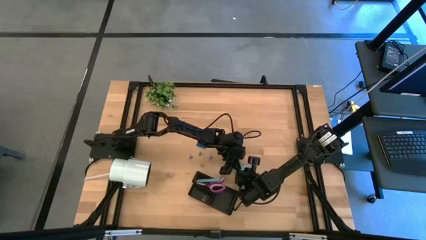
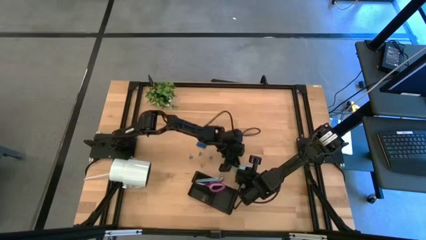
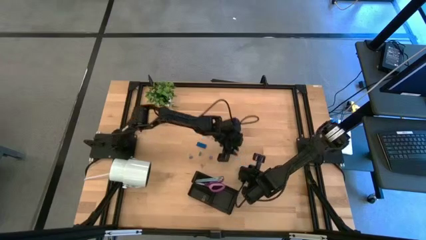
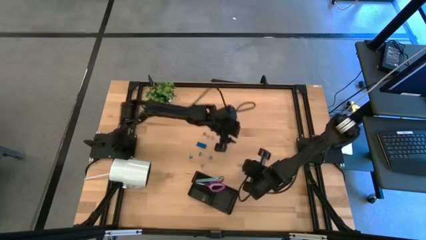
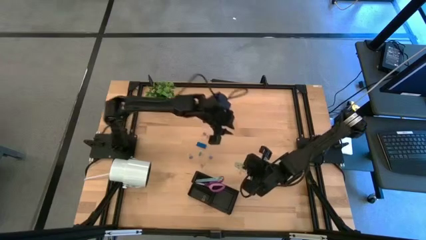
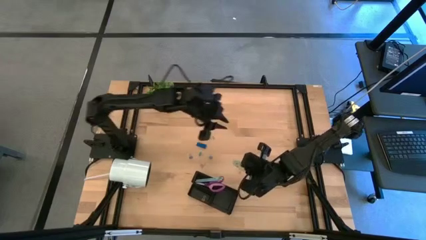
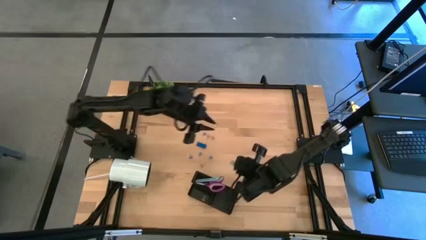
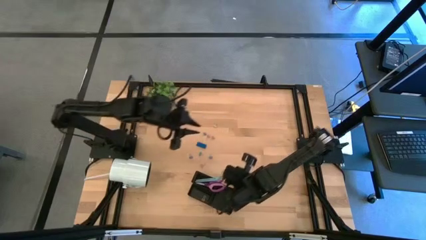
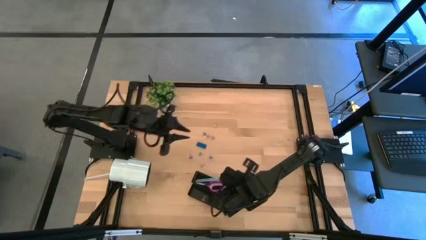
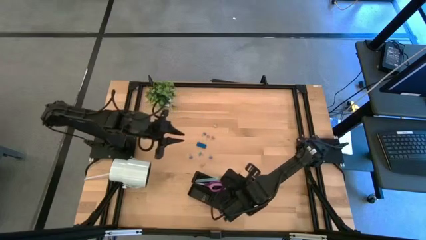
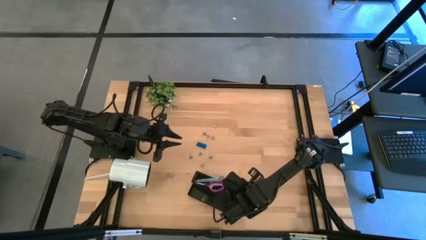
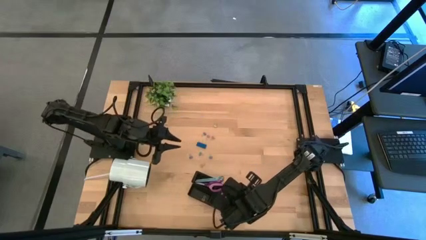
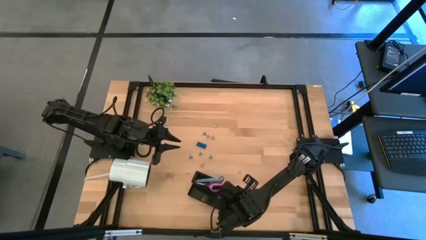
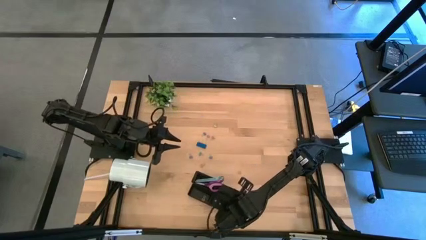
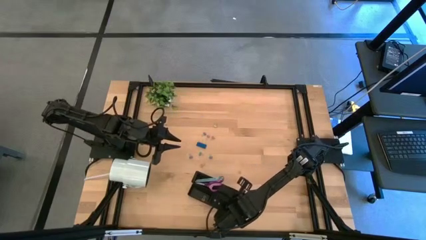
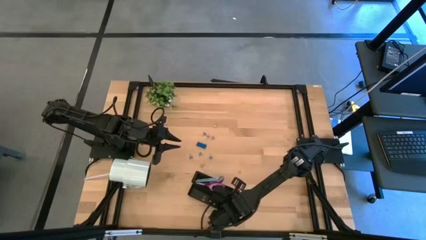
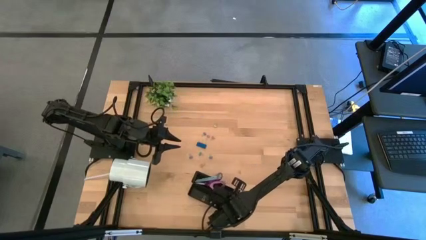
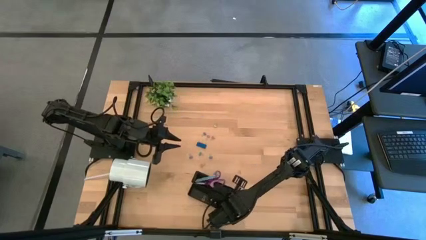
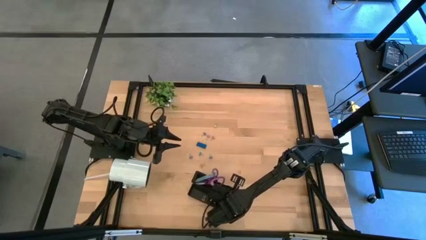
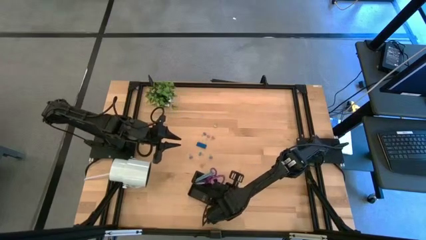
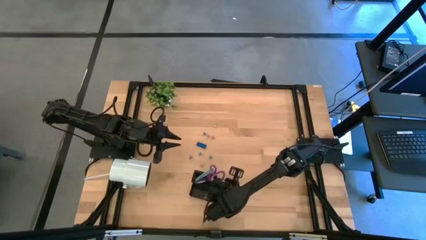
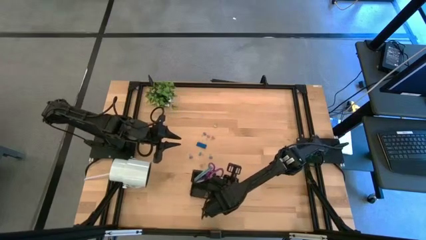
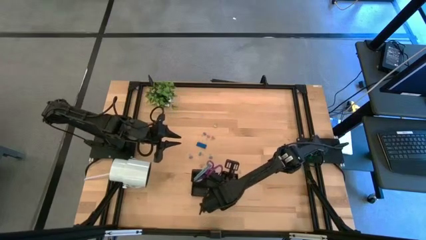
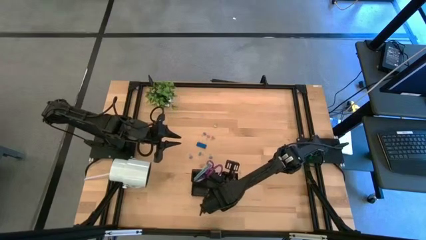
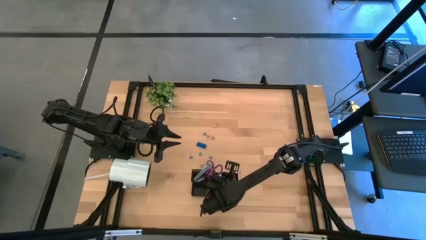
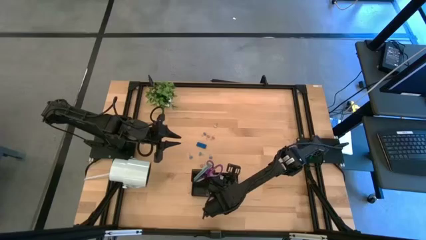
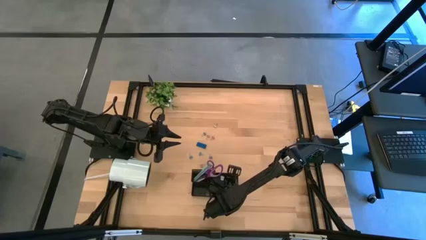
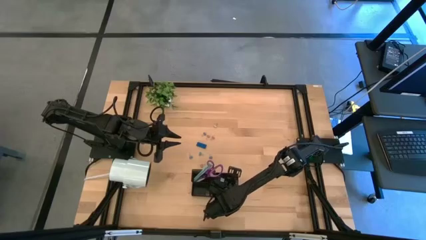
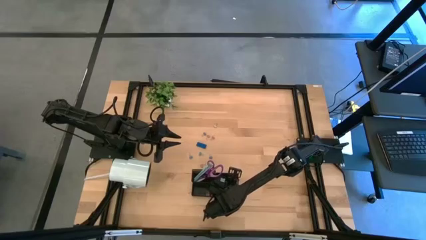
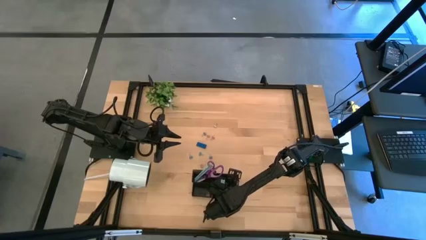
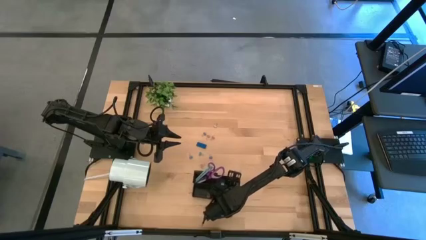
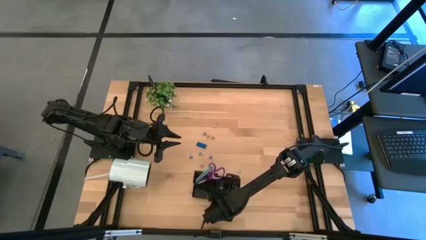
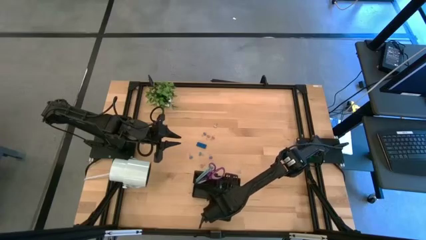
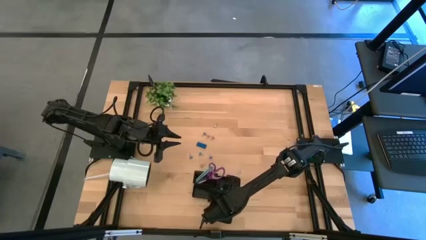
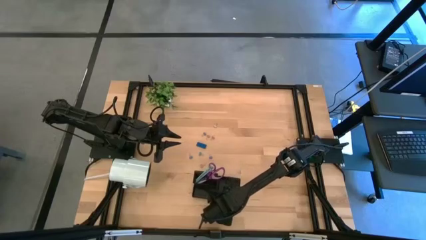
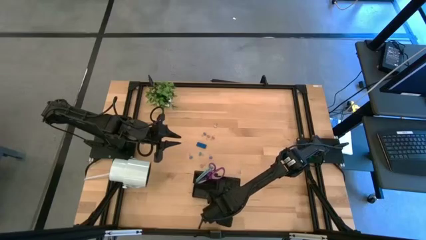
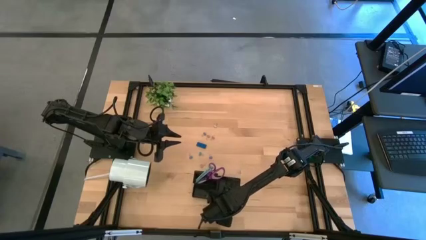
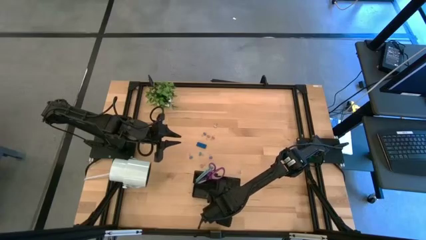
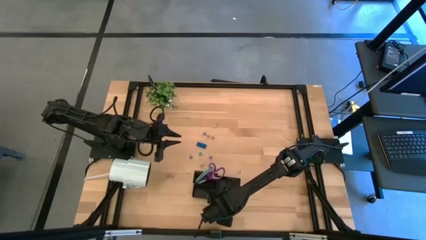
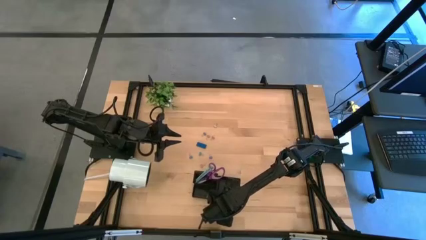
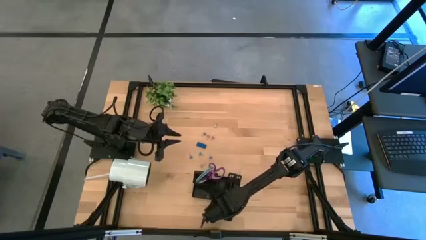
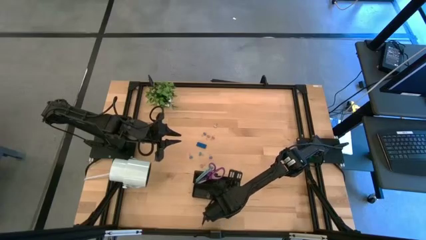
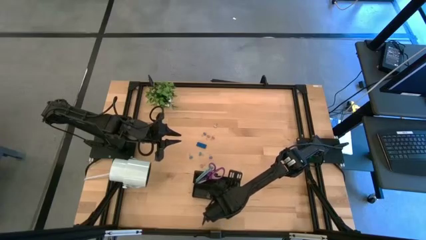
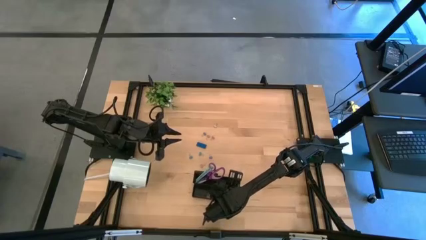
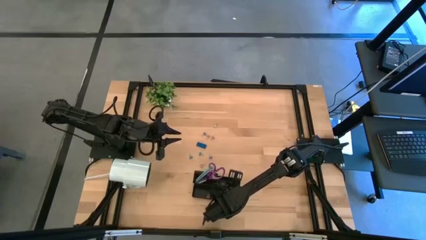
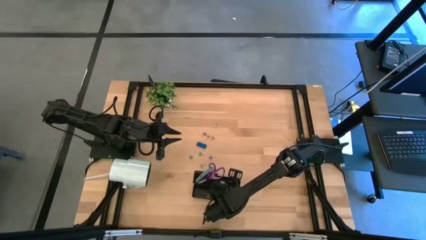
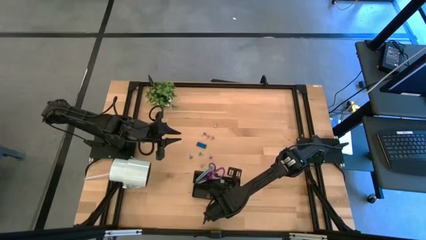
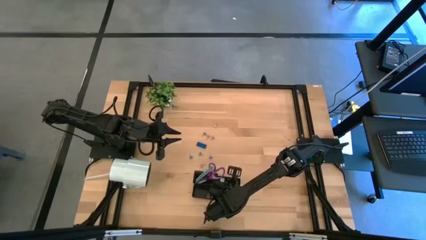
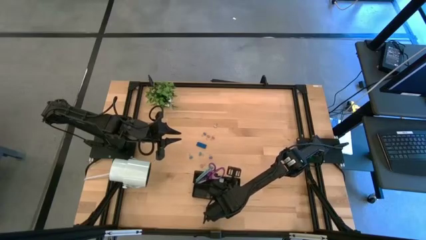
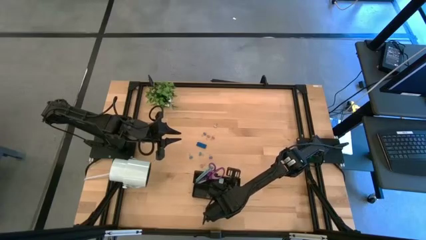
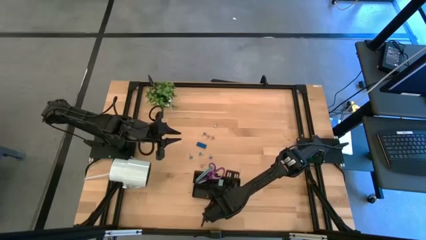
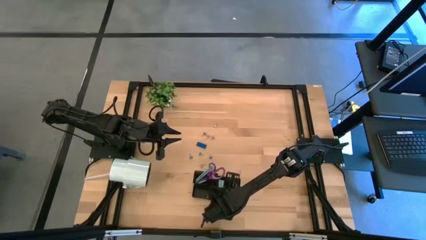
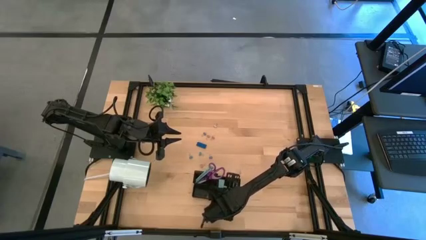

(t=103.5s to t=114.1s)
Task: Pick and place office supplies into organizer
Put the light blue sticky note into the desk organizer

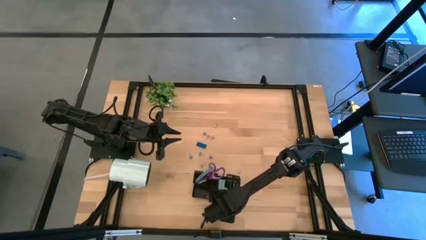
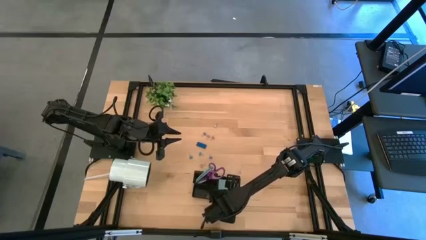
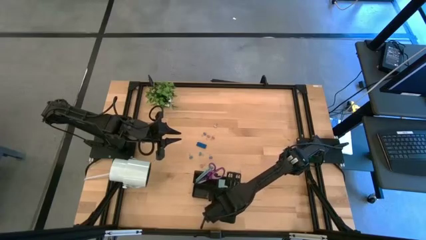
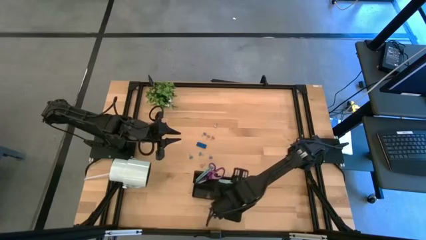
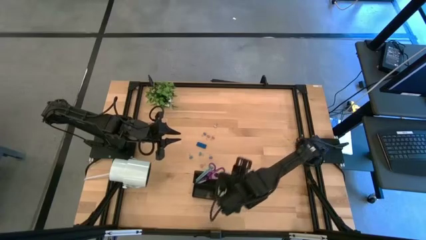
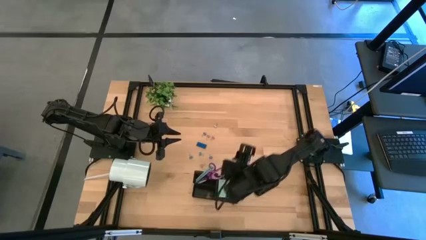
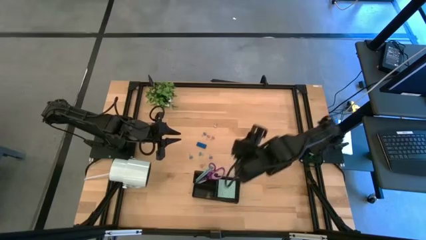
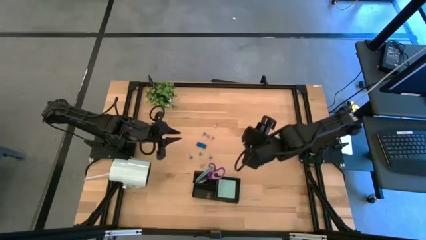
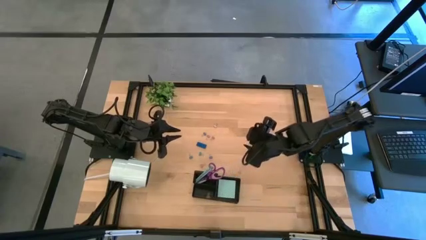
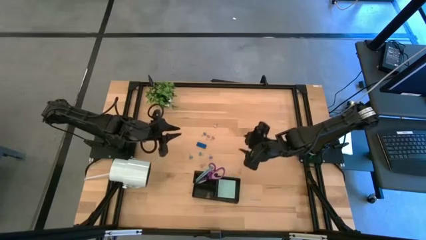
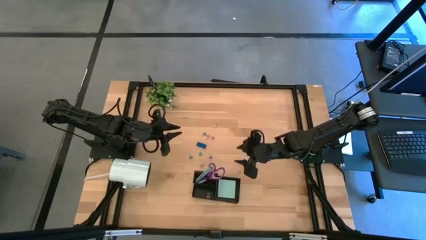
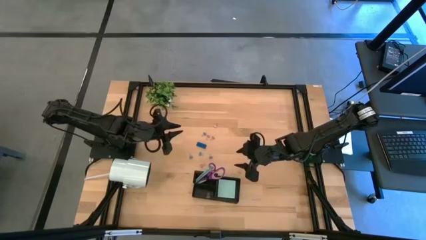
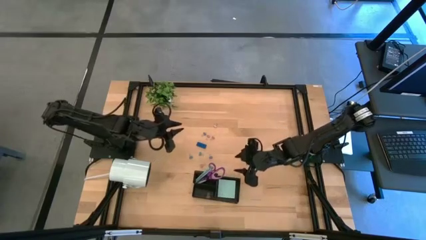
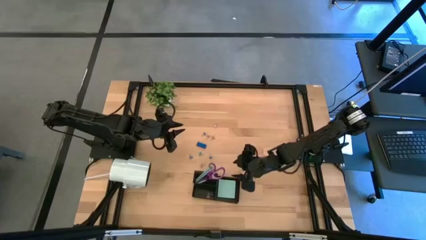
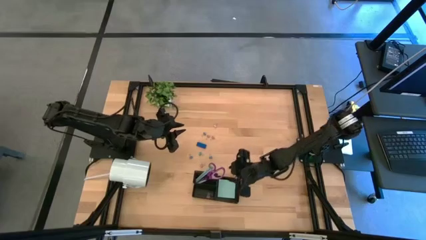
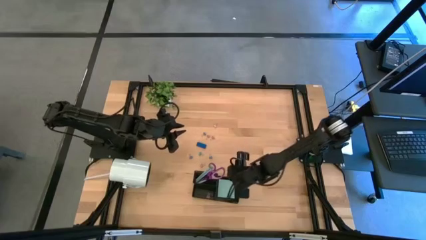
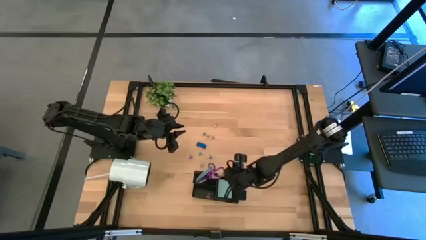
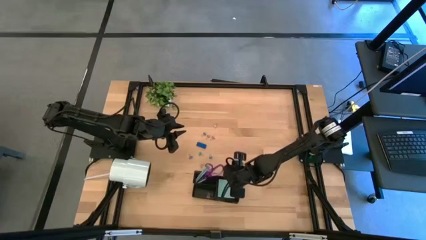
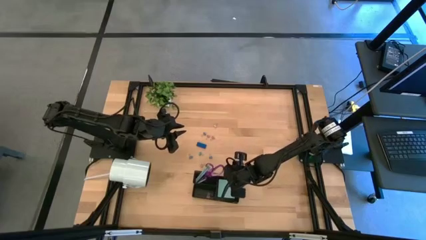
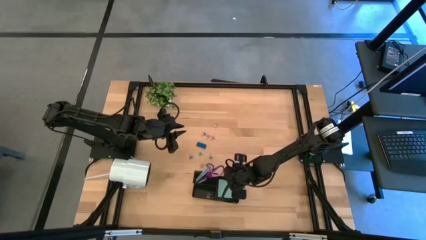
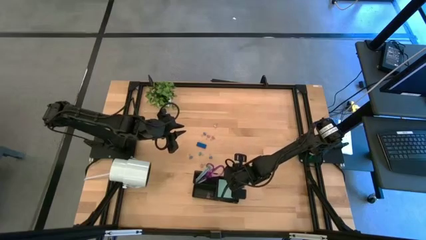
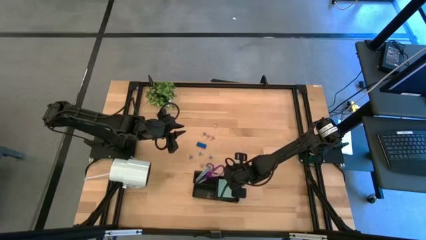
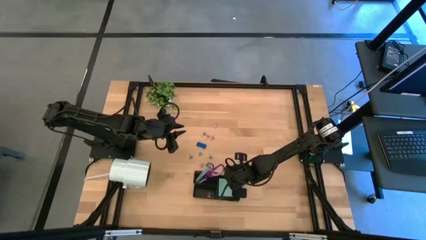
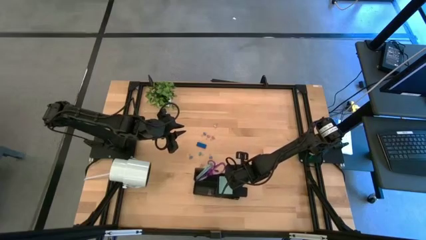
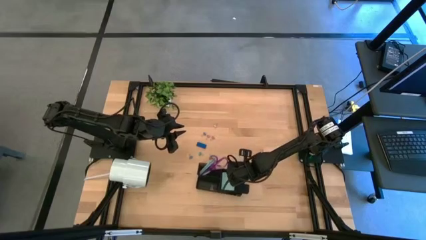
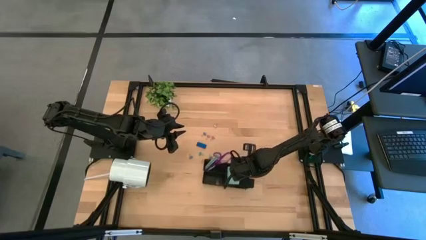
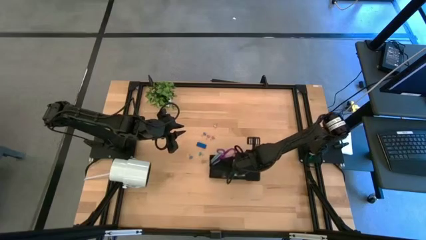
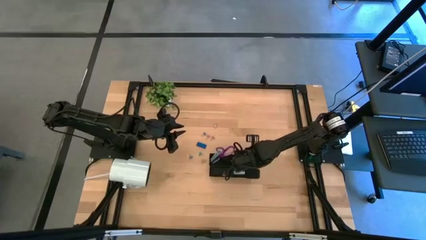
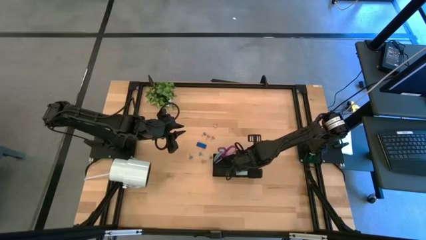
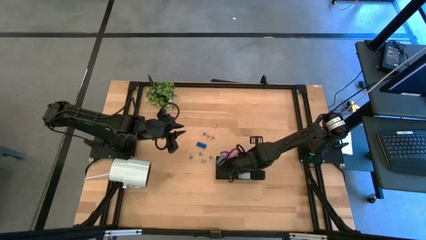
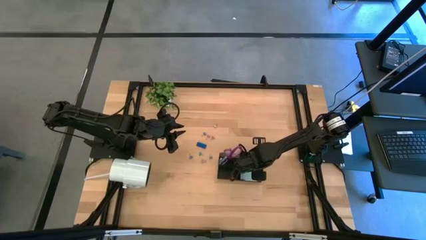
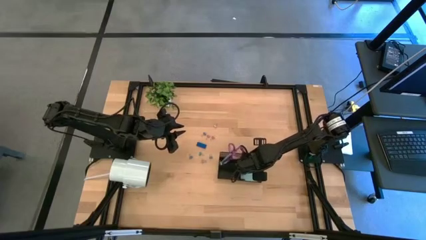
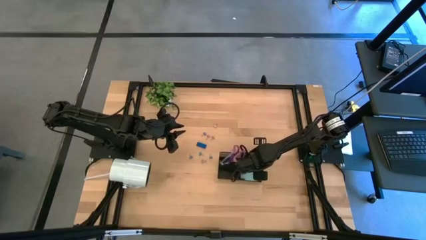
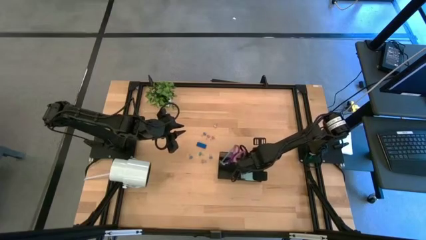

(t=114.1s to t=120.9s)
Adjust the desk organizer on the table
